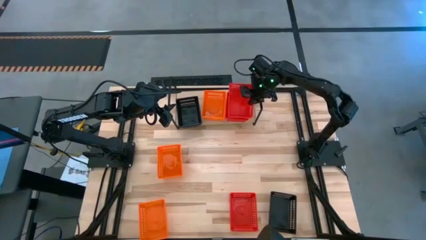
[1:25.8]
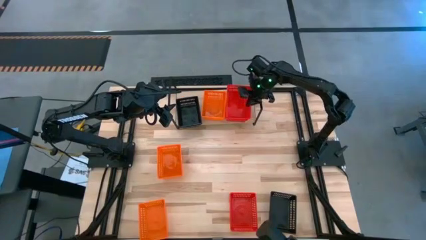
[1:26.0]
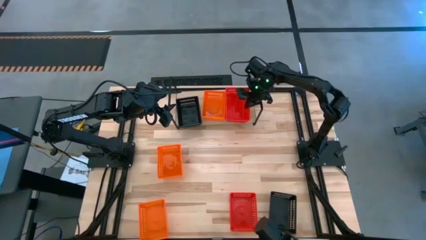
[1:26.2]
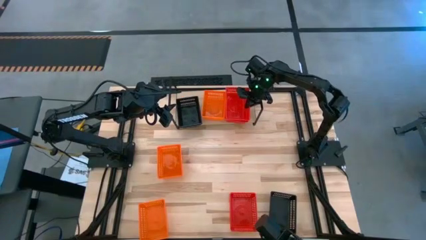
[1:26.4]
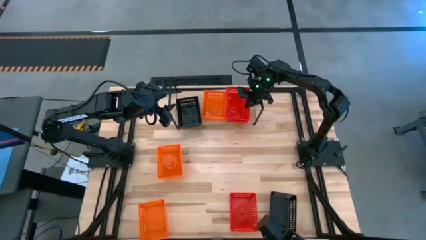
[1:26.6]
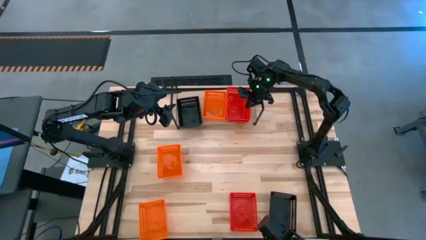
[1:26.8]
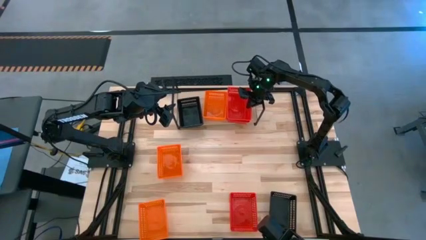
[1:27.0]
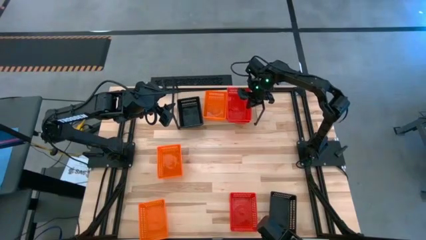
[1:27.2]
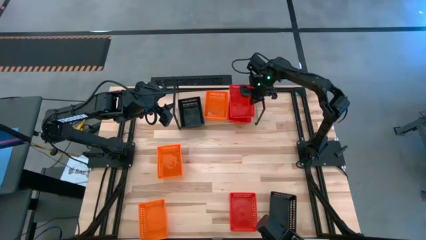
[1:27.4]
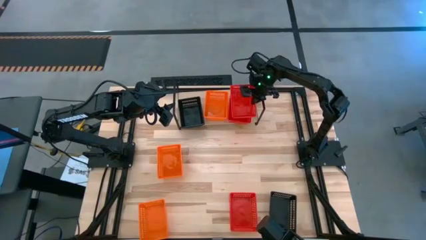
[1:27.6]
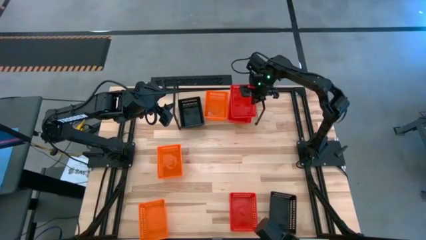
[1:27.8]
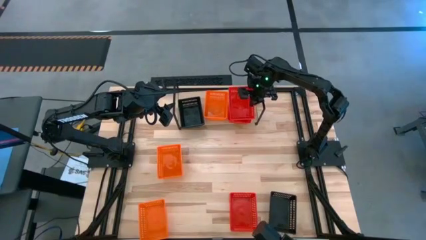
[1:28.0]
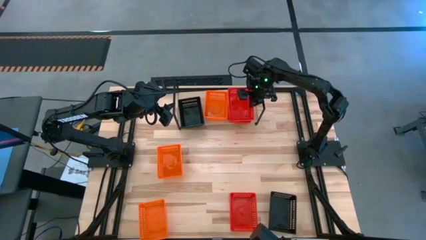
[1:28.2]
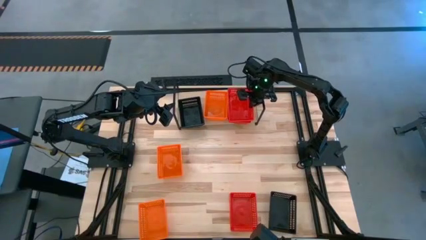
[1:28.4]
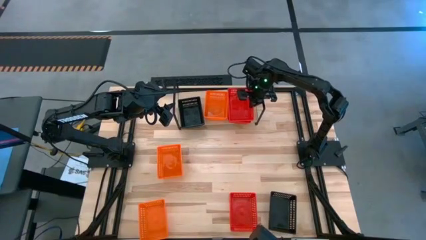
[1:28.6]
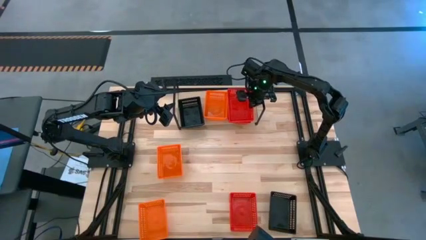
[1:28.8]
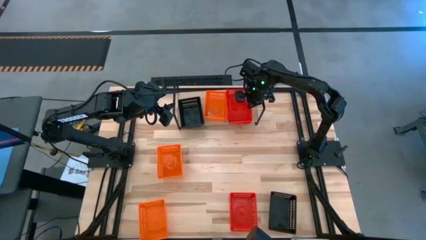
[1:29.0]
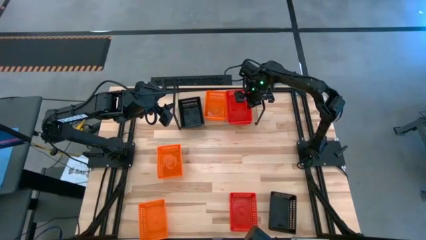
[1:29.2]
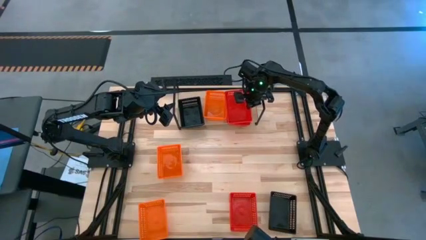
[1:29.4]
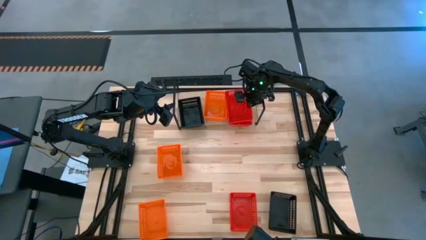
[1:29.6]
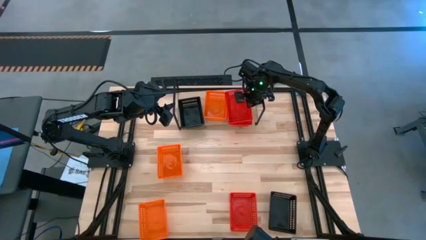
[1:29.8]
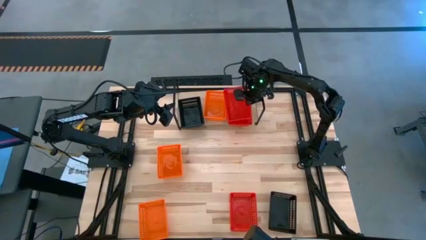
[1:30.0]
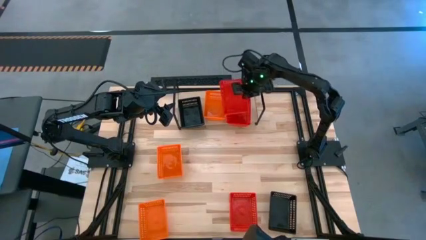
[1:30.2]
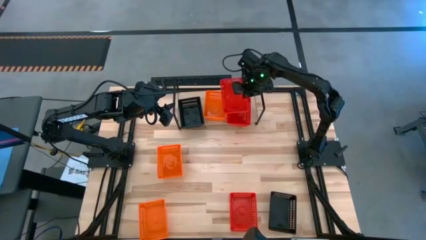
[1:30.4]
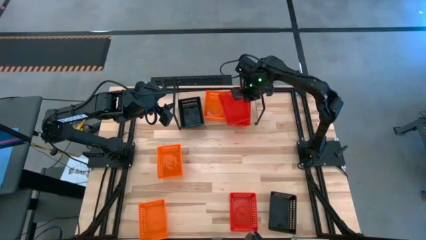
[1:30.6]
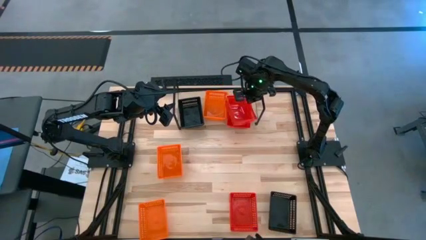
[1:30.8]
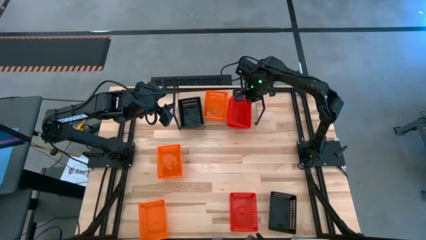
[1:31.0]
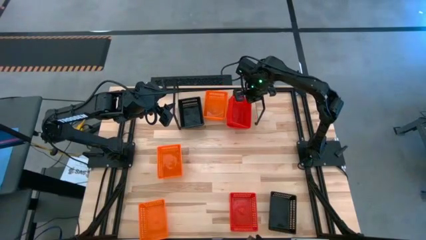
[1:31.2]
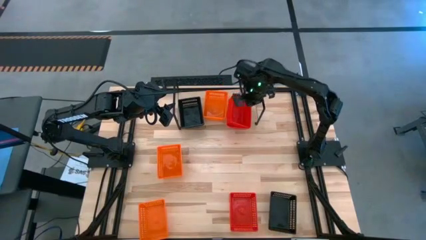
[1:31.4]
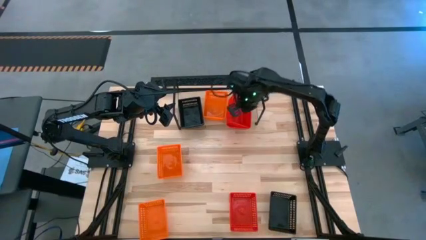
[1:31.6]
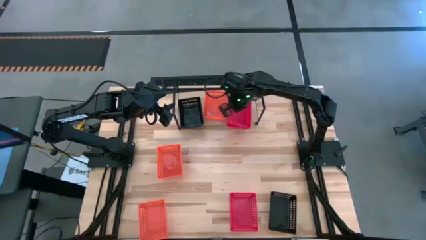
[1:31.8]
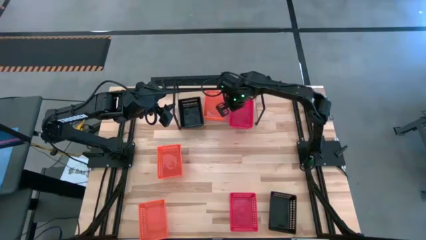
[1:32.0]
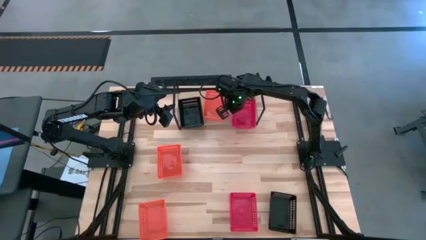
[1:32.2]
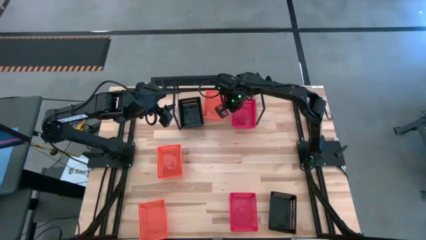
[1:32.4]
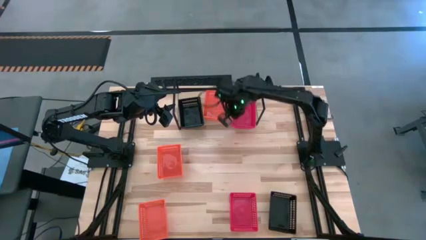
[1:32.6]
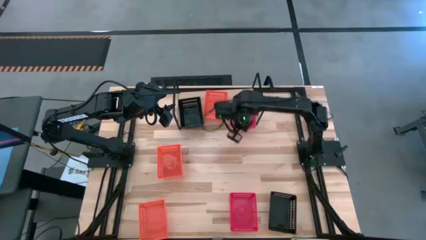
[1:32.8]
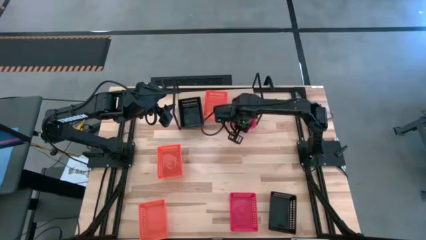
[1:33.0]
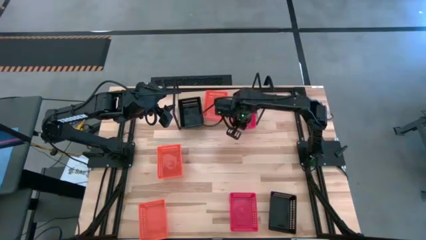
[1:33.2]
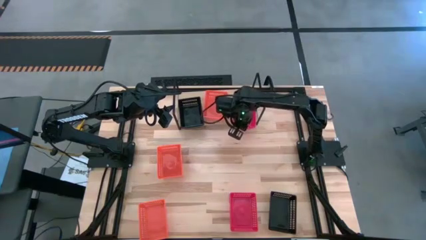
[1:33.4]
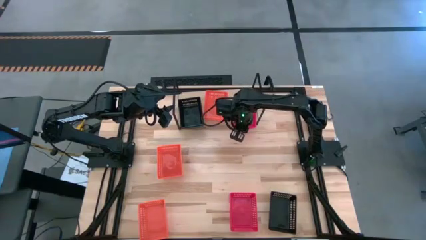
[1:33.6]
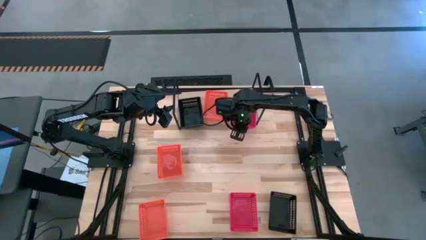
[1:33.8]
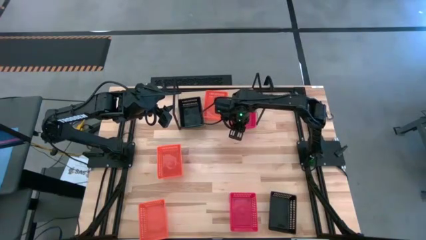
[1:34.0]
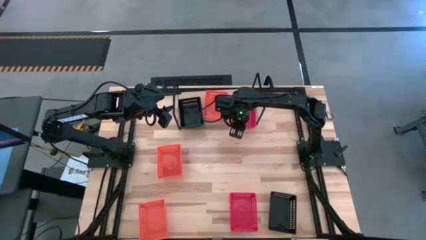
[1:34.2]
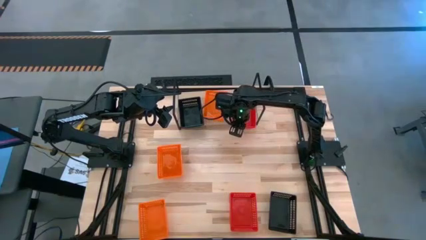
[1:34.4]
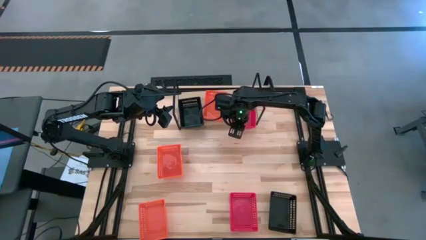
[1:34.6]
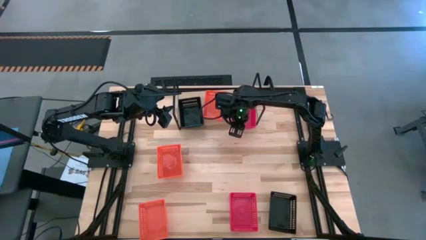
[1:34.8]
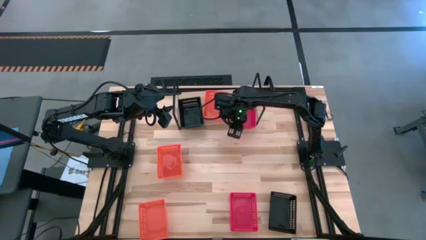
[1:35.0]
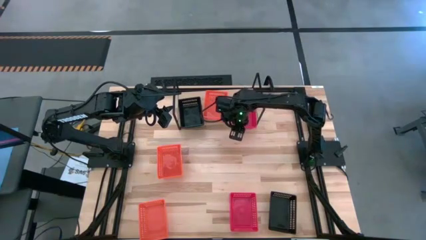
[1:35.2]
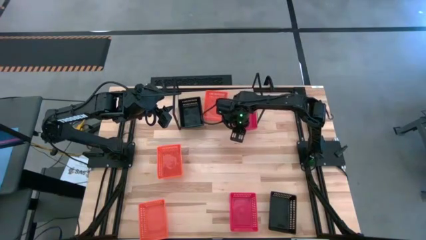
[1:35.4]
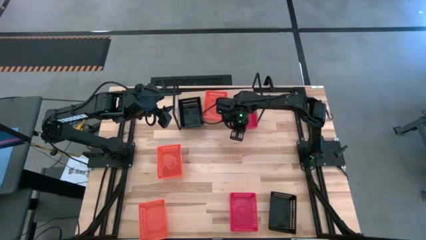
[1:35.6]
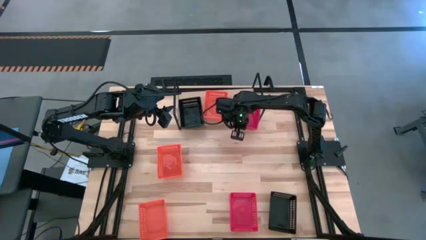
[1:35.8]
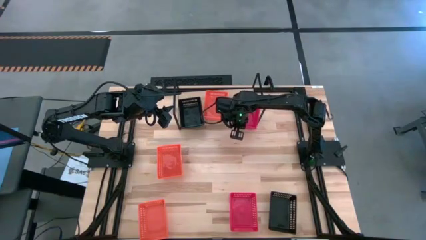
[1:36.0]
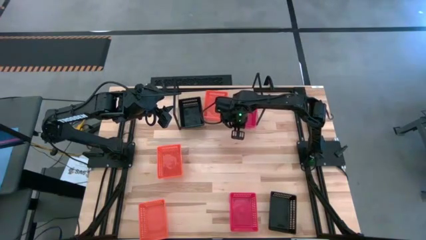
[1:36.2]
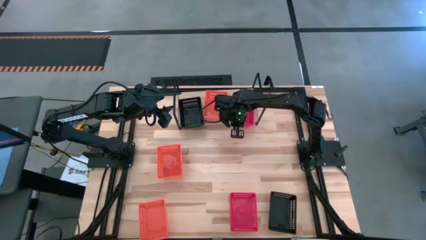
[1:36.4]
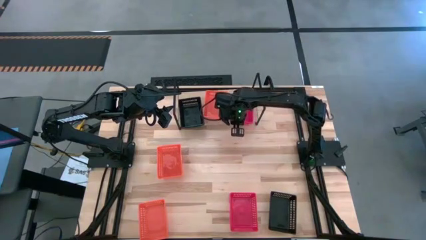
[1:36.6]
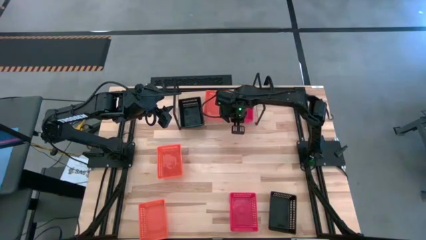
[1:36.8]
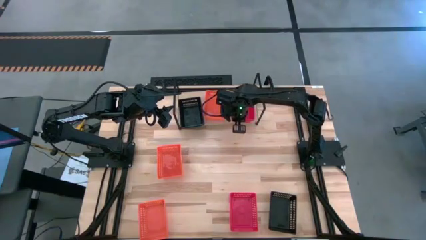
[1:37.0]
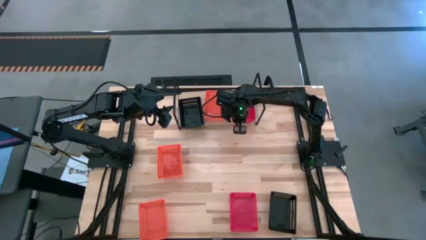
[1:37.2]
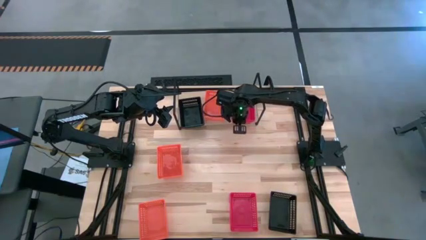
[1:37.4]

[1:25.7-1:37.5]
Task: Stack baskets on shelf by color
Stack the top red bin on top of the other red bin on the shelf

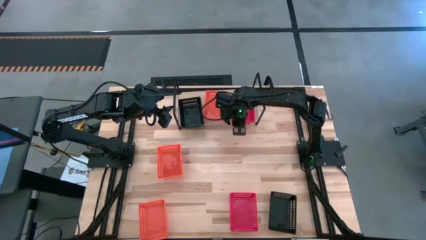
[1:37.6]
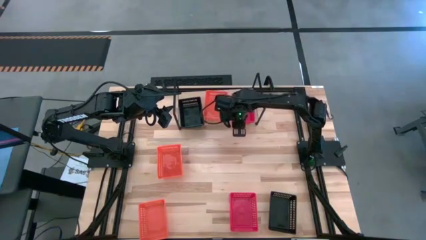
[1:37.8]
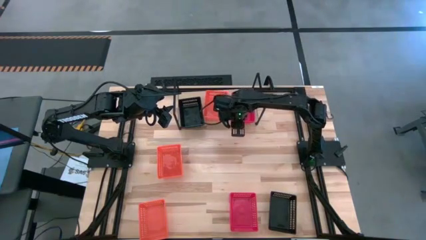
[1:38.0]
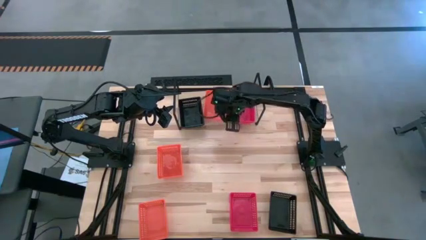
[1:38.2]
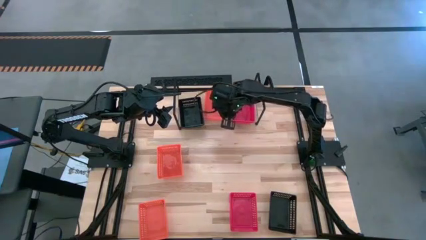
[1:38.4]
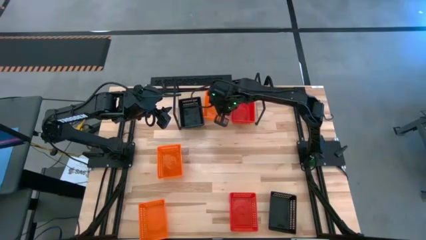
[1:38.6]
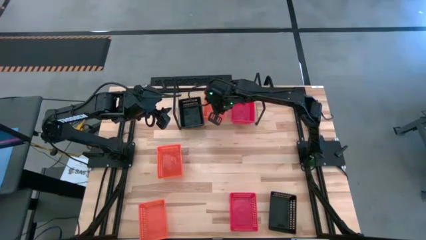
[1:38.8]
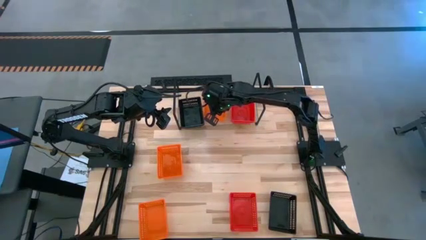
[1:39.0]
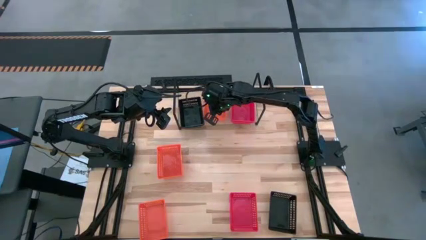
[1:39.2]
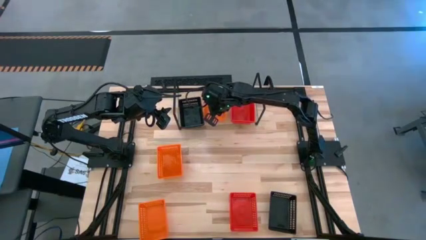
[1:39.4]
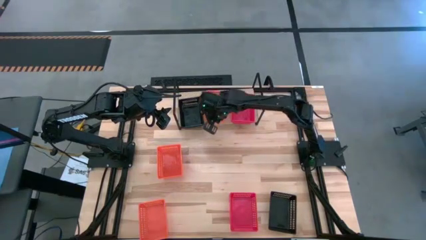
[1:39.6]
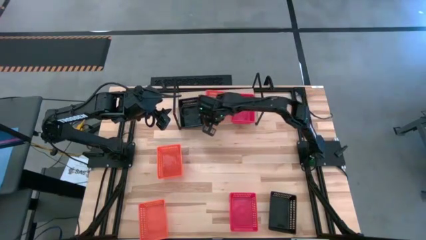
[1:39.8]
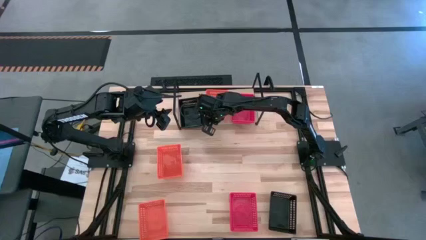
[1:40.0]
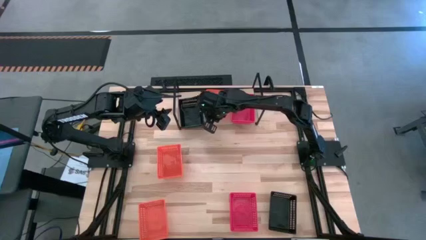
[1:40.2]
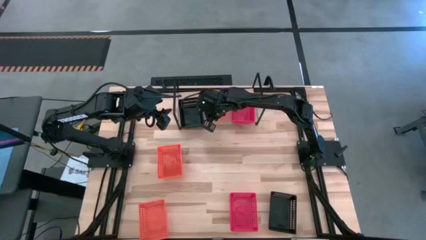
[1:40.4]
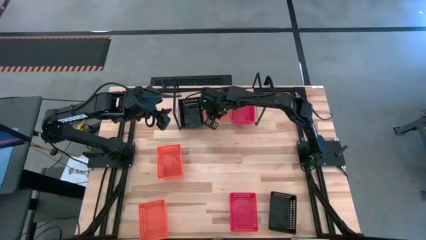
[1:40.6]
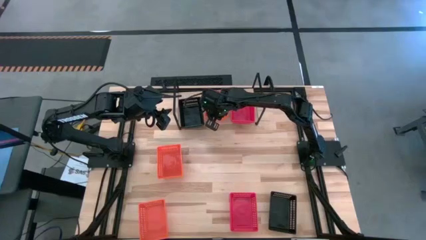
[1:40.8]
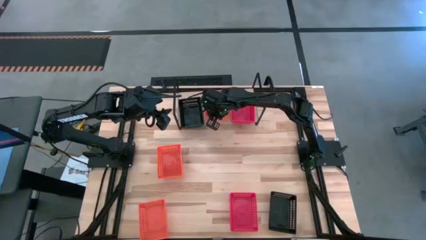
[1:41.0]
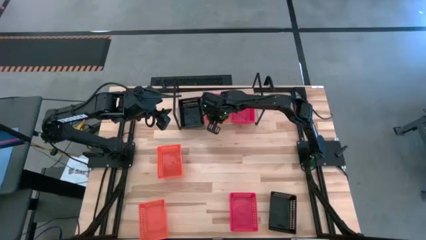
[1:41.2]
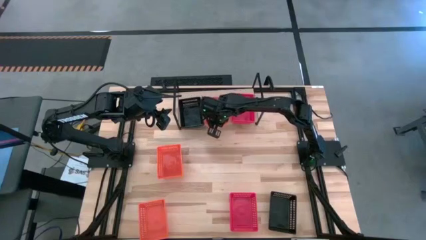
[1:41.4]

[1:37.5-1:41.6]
Adjust the orange stacked bins on the shelf

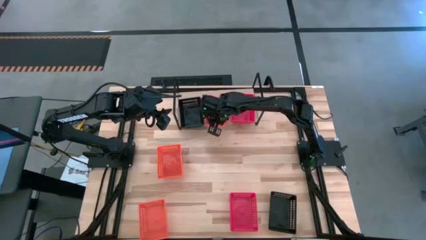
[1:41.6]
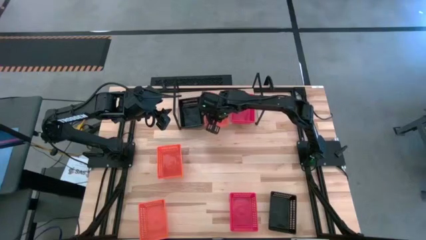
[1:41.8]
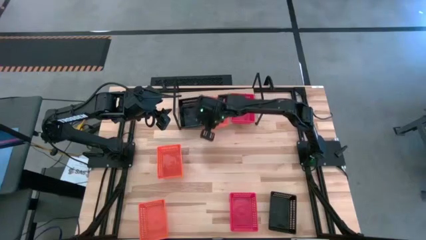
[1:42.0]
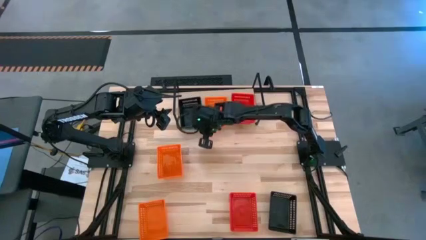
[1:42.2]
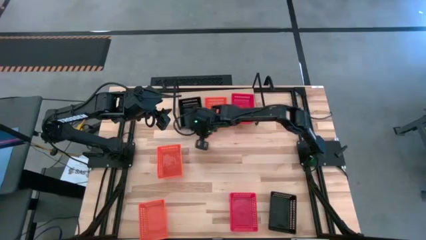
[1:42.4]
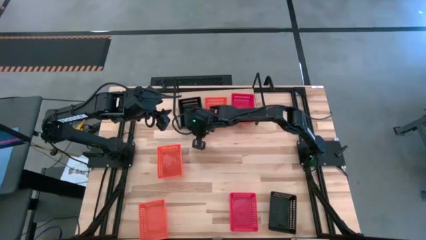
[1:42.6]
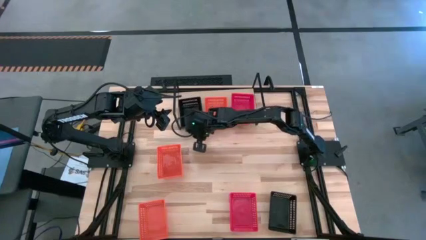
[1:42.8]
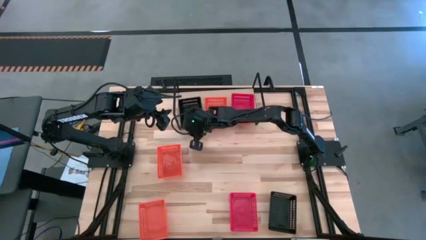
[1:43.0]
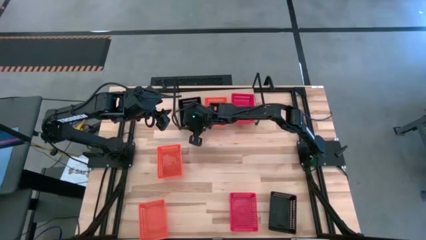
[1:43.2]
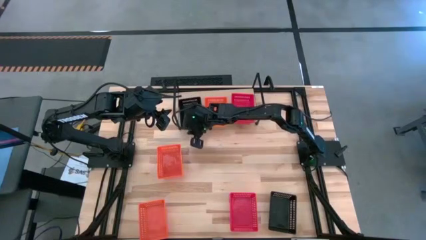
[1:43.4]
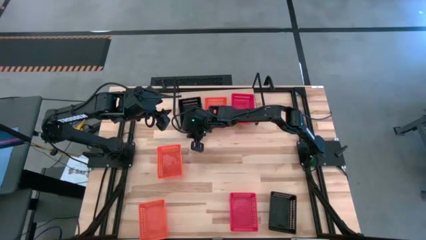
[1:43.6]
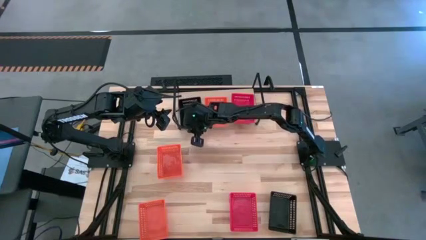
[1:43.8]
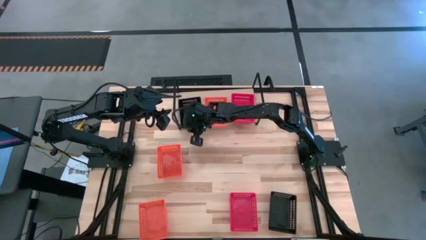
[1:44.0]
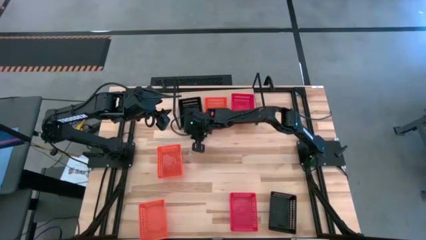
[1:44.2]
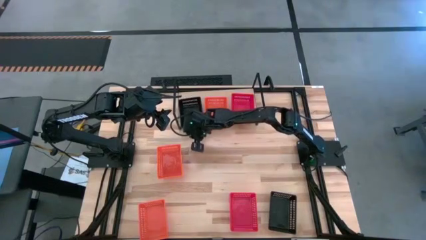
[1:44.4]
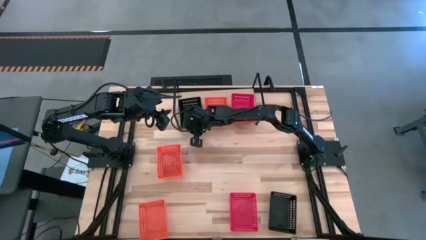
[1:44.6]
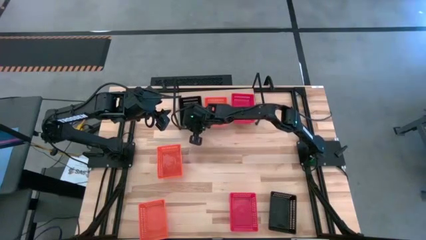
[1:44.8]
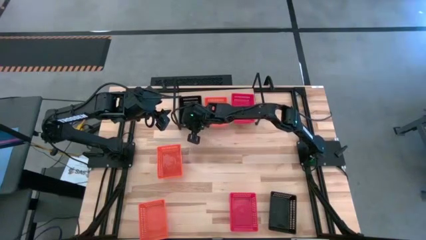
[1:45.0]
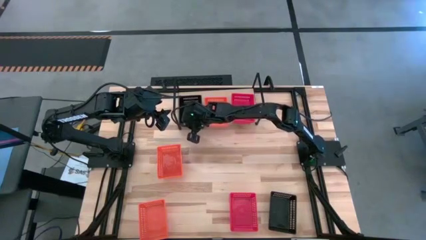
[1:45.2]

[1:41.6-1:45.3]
Adjust the black stacked bins on the shelf
